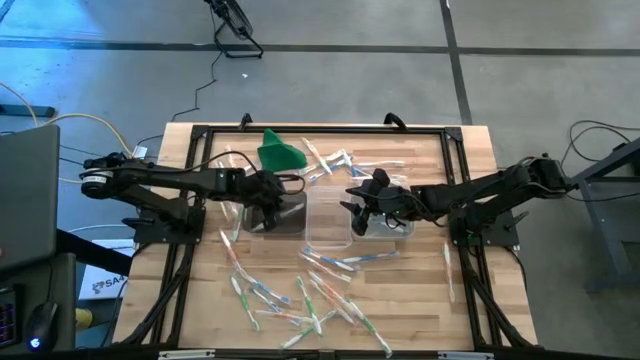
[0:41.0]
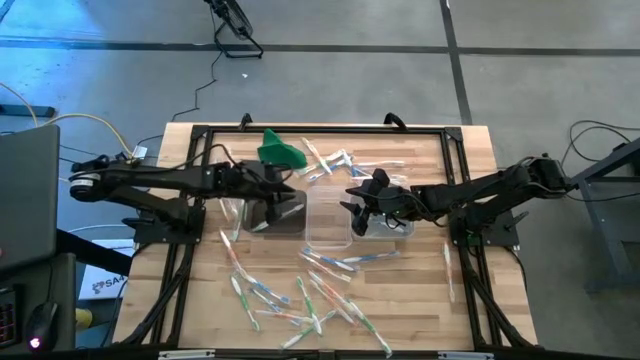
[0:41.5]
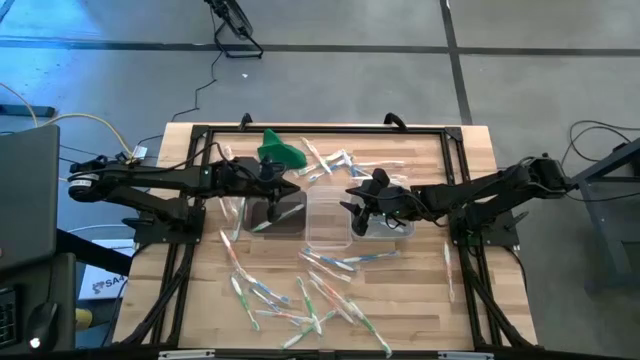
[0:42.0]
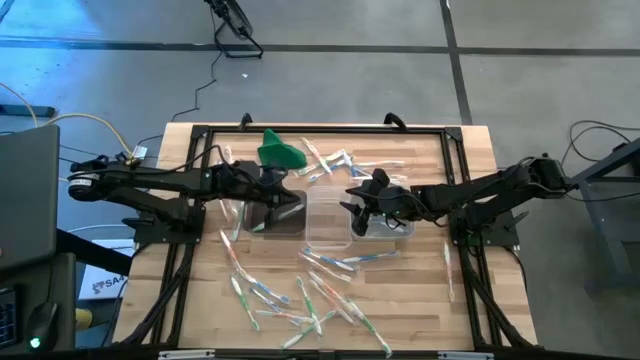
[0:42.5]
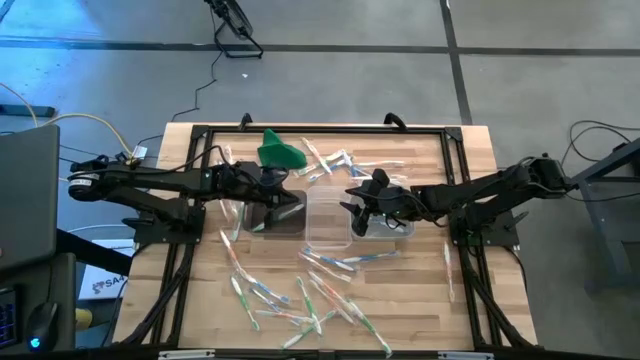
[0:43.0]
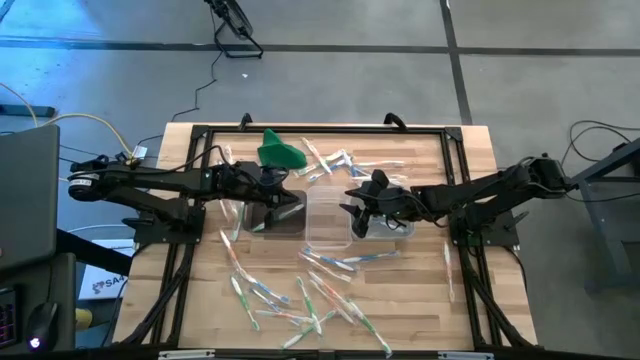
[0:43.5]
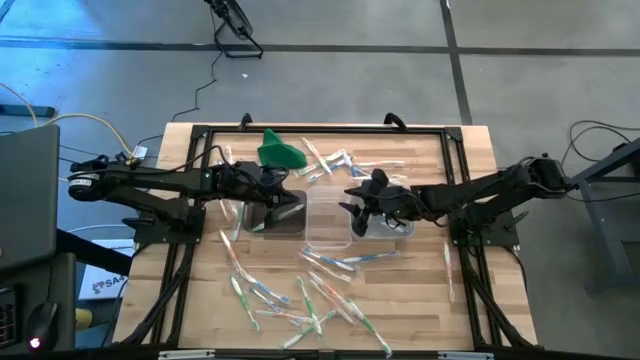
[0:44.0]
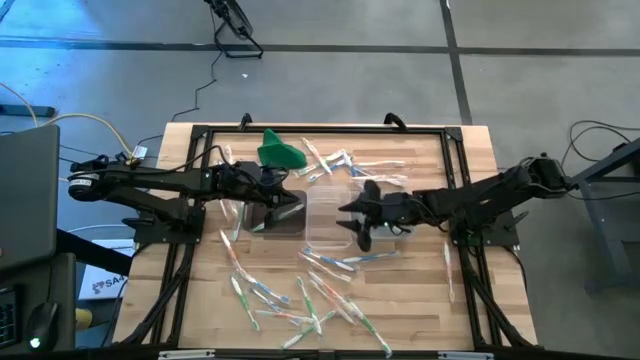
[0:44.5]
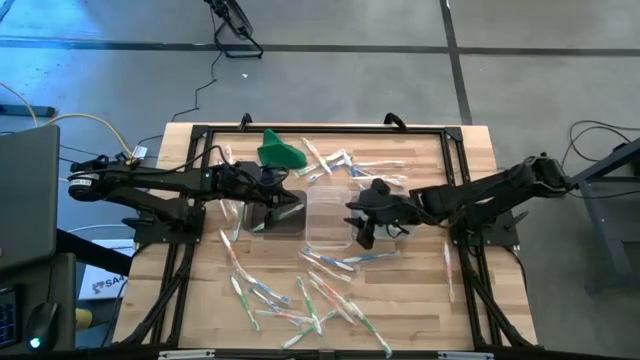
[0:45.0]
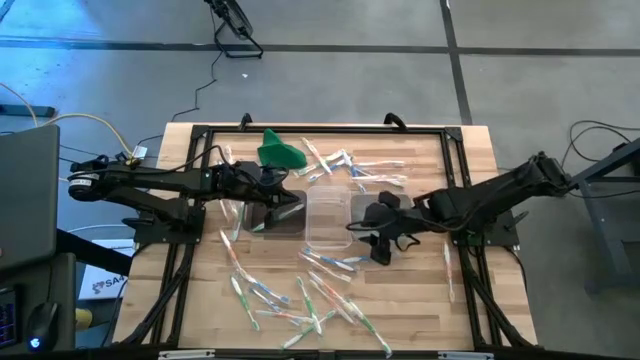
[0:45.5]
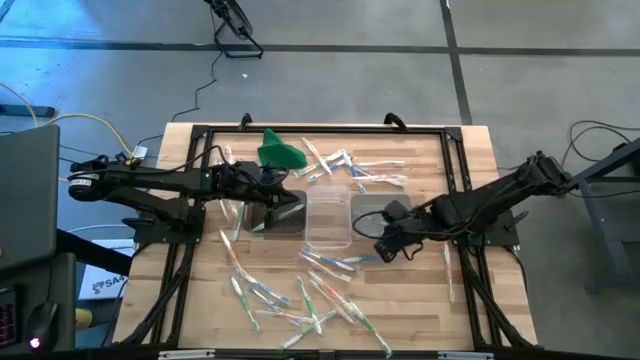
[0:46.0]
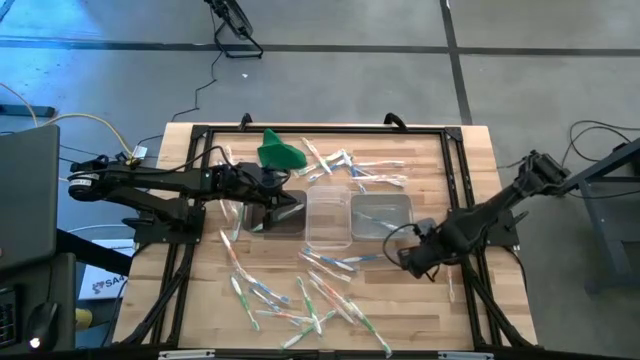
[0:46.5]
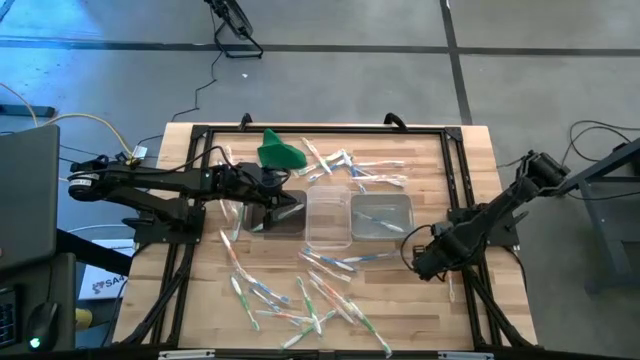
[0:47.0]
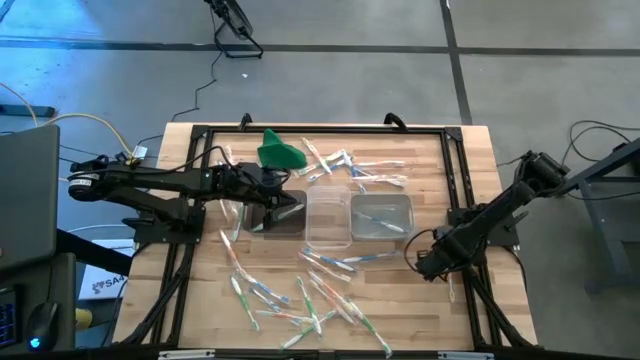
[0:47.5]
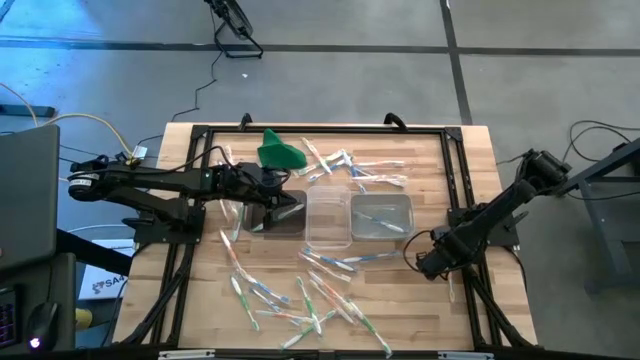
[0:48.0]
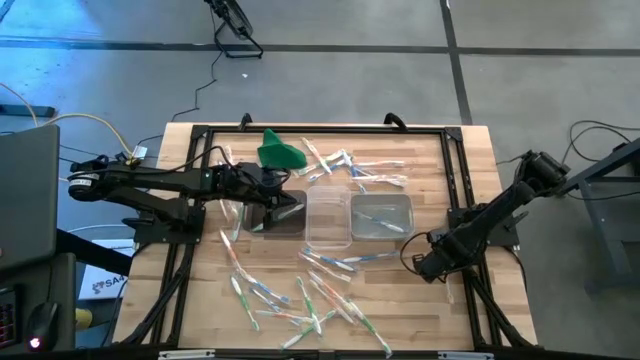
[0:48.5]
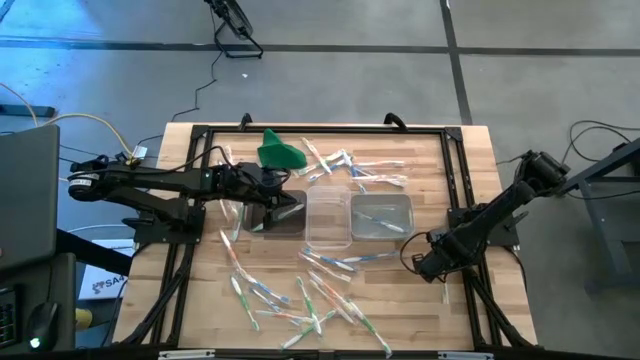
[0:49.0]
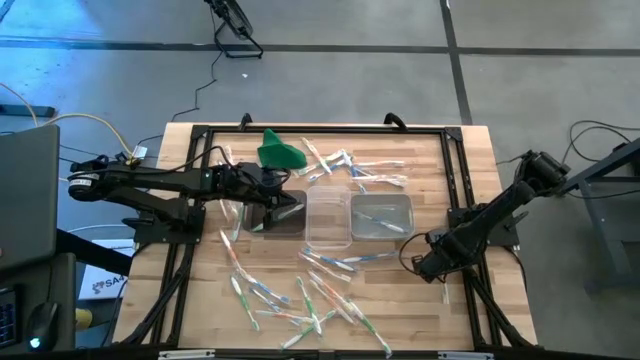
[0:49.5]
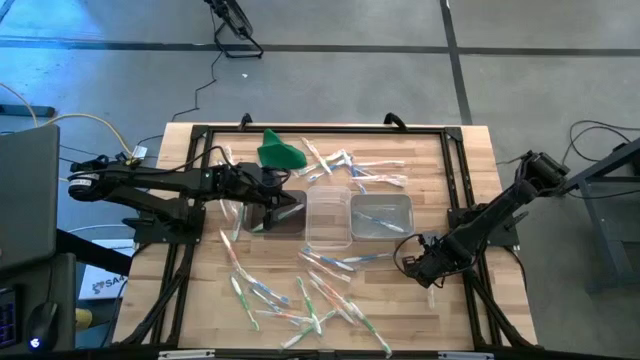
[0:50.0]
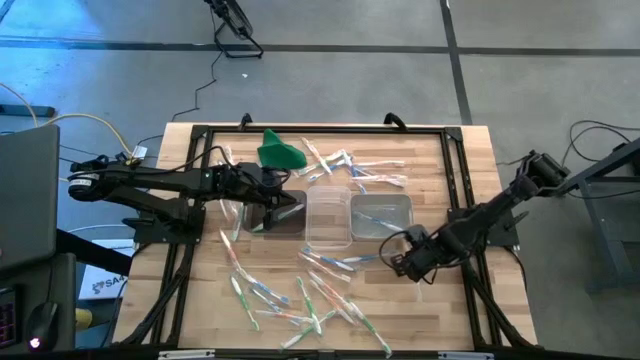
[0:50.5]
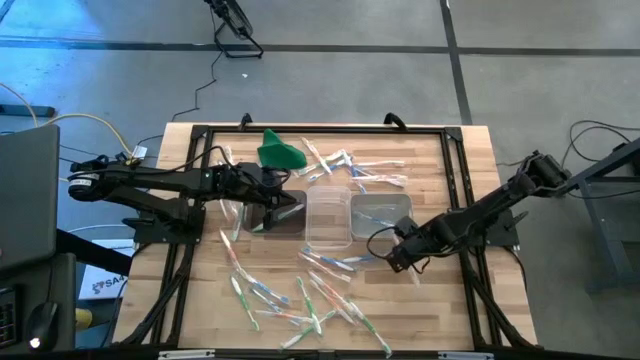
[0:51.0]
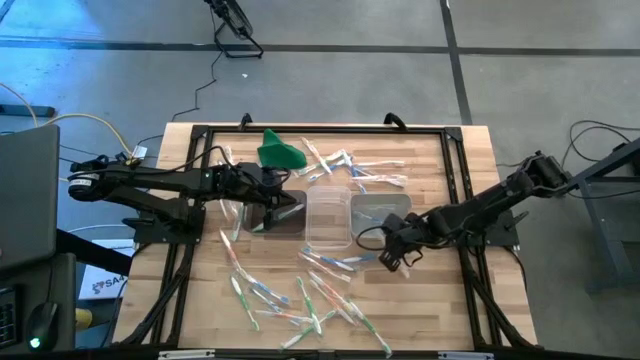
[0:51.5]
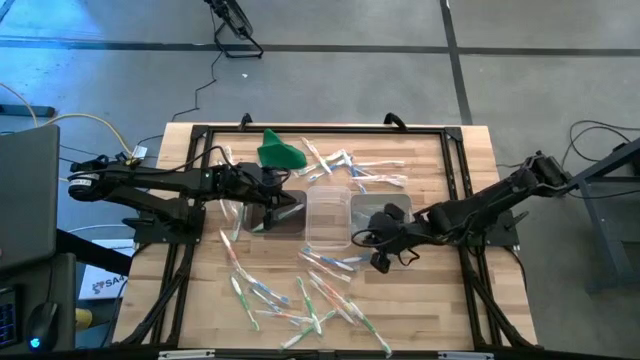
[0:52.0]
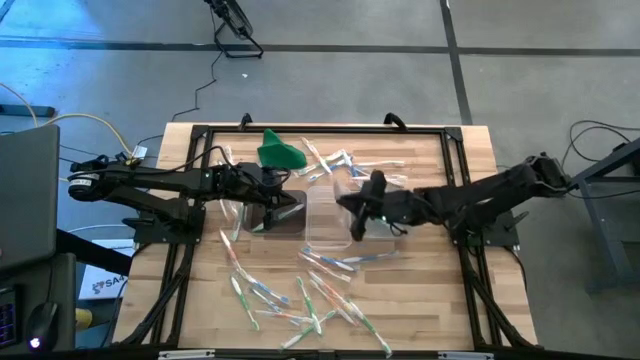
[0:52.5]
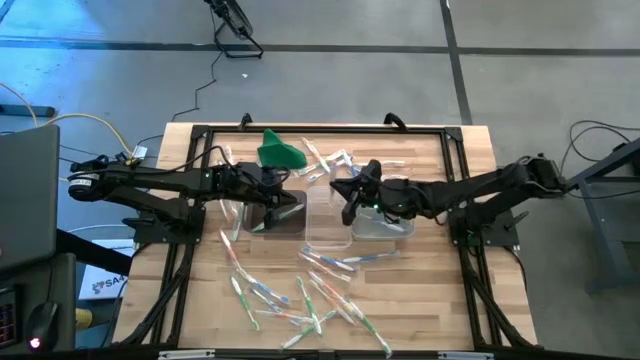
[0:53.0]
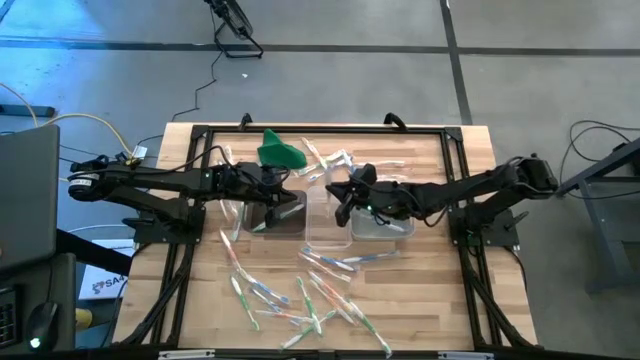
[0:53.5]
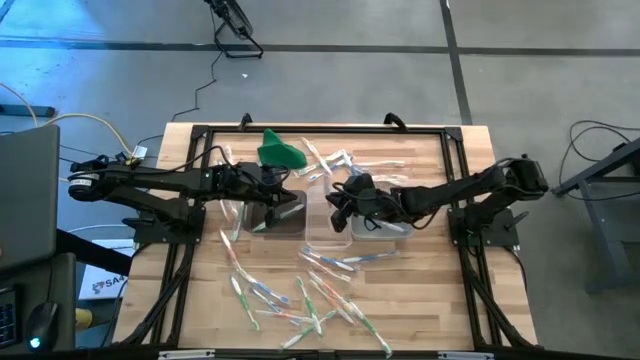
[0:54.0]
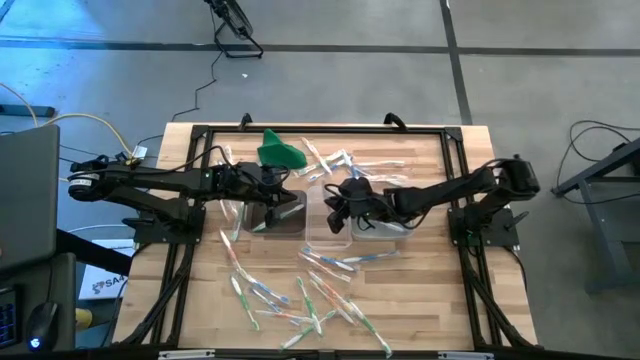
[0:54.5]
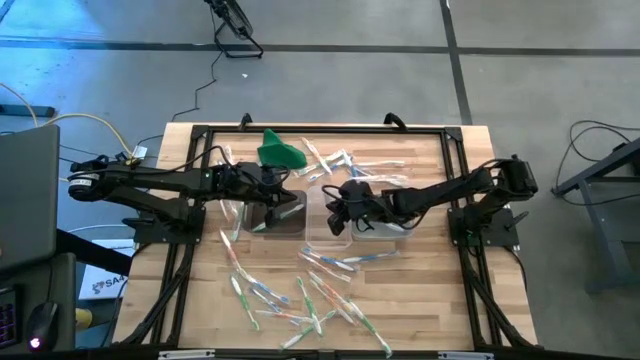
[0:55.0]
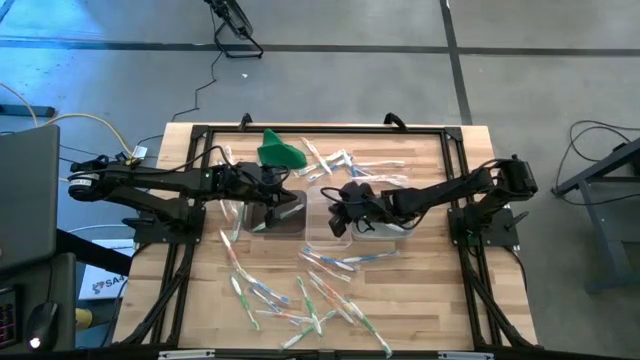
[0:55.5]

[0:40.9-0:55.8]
Task: Pick & Place Toothbrushes
Put the orange toothbrush into the transparent bin

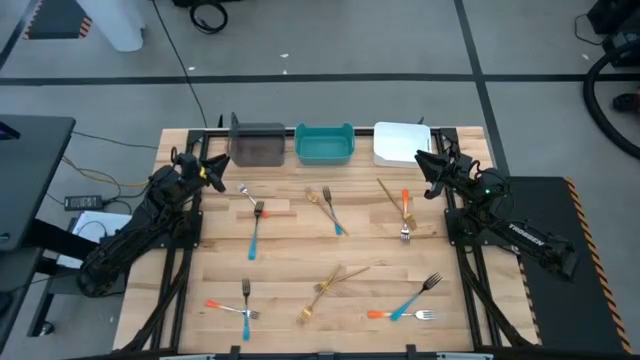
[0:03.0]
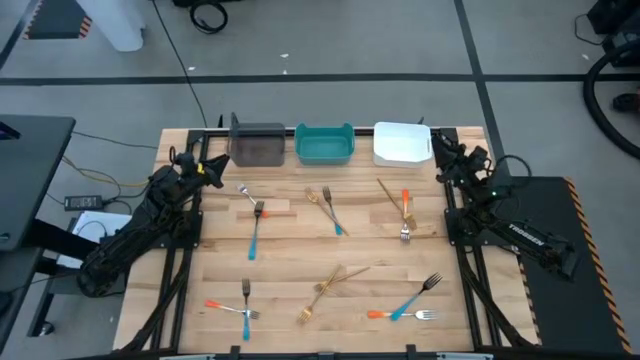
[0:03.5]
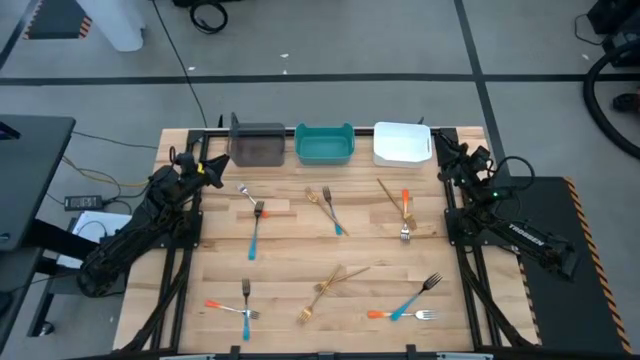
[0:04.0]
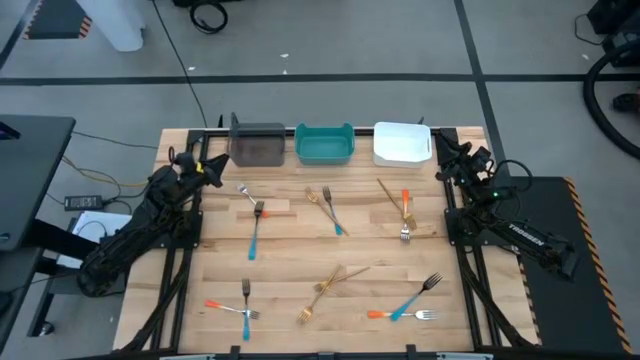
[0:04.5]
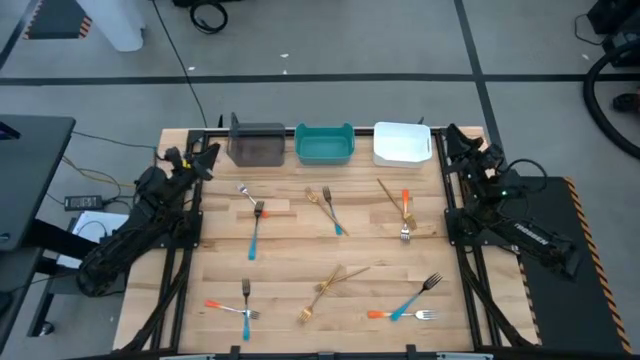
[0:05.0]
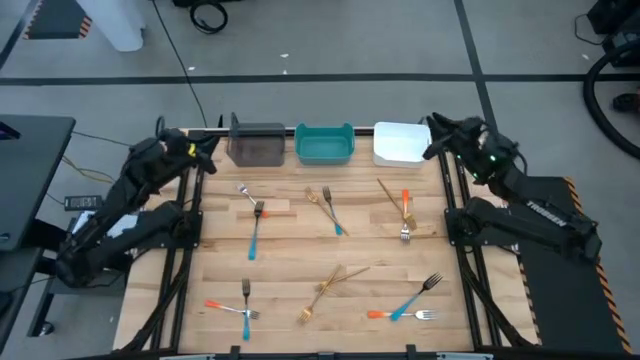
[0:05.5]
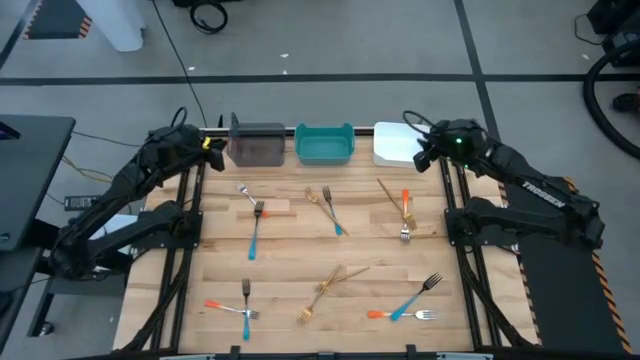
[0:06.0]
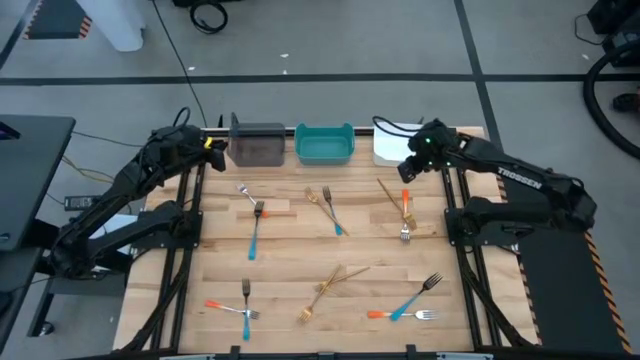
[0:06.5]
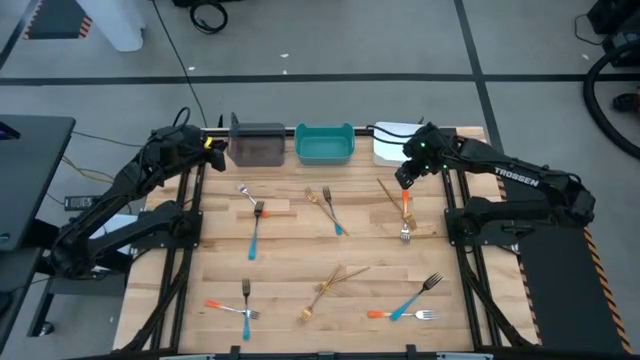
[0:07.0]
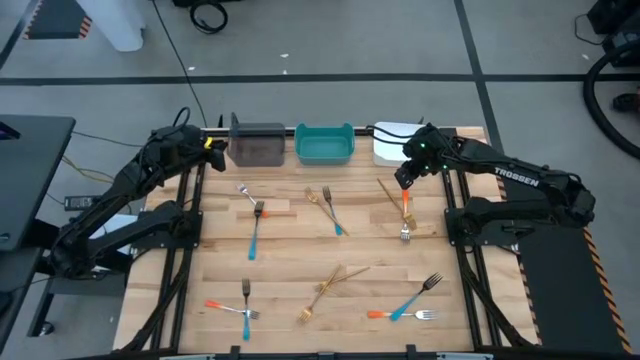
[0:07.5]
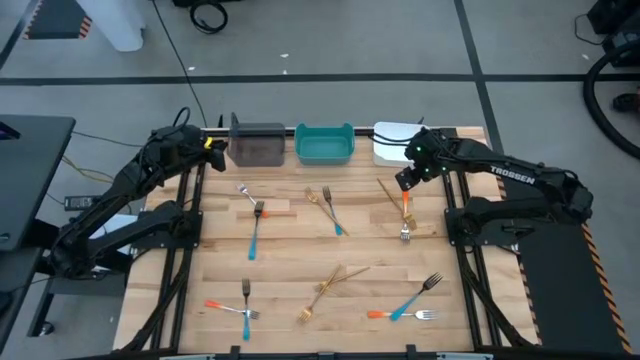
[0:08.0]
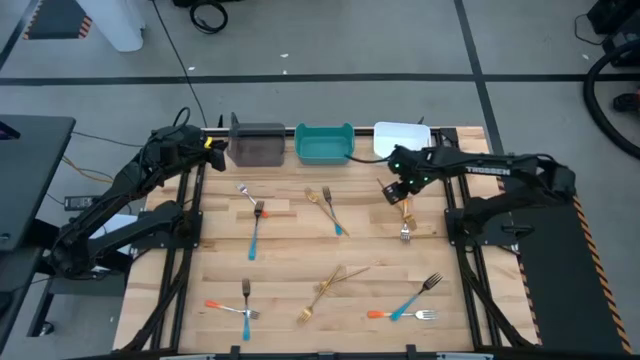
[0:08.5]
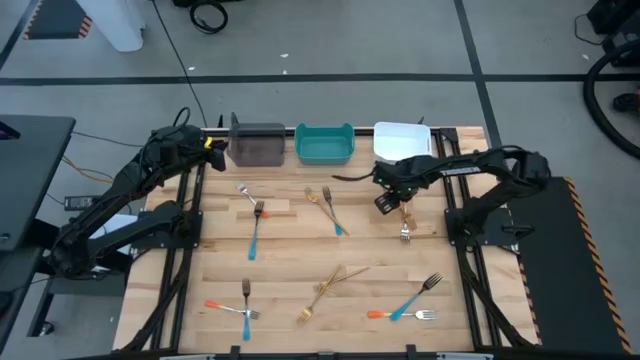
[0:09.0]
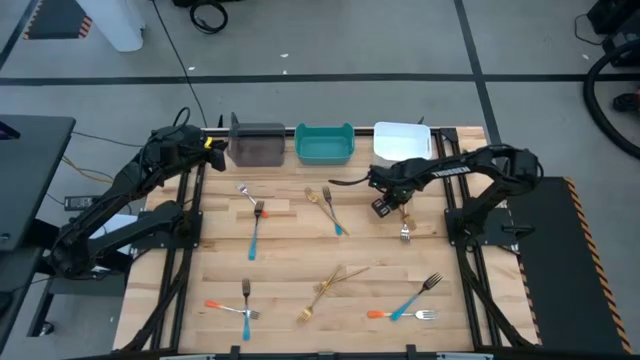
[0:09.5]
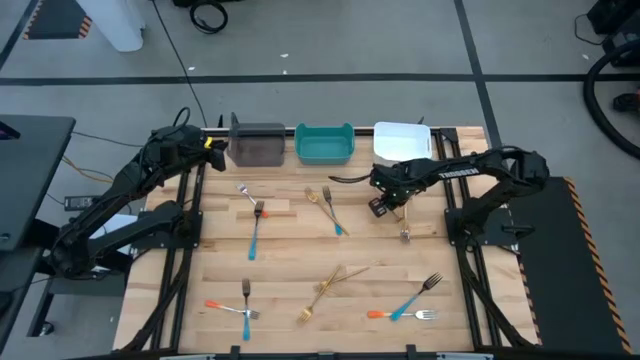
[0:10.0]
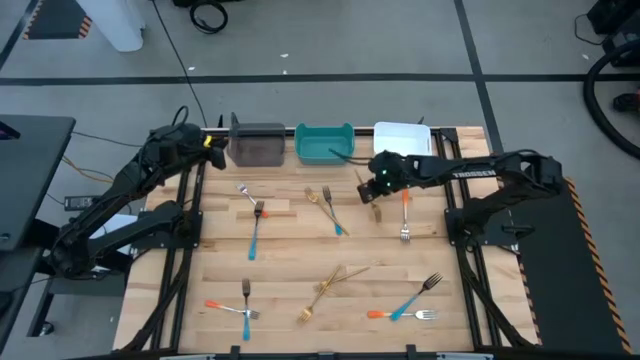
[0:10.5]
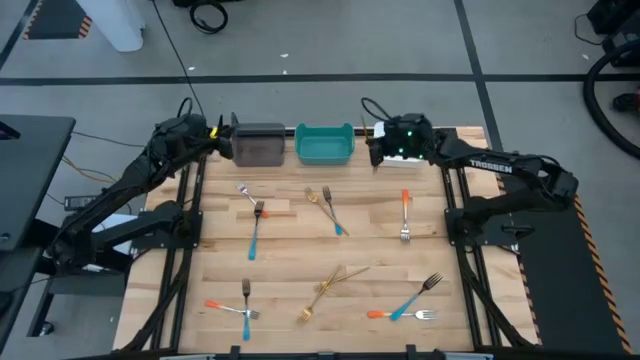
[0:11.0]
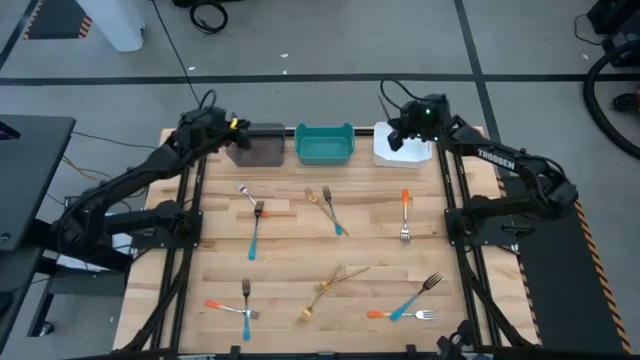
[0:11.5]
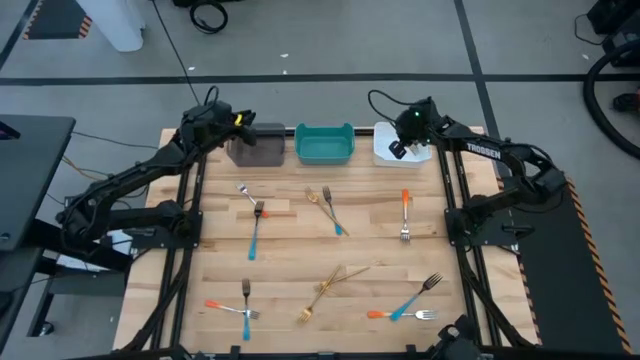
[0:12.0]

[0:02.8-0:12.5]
Task: Sort silverware by color (type)
Put the top right gold fork into the white bin
